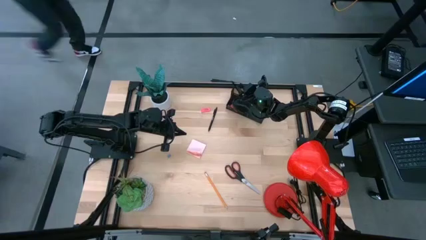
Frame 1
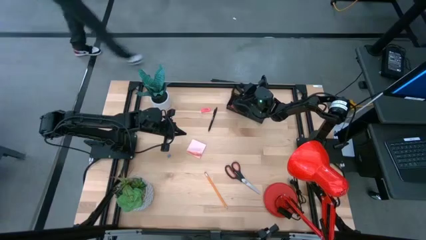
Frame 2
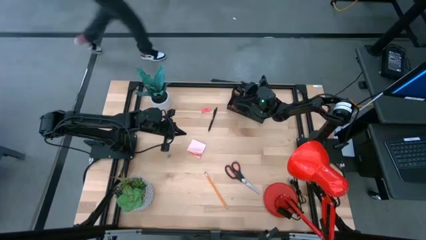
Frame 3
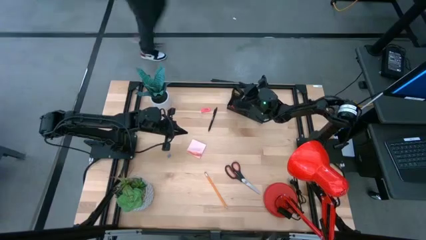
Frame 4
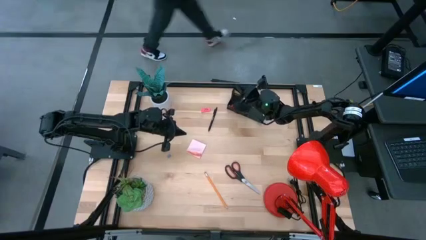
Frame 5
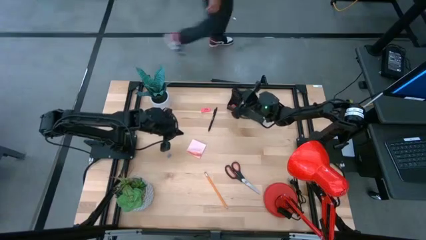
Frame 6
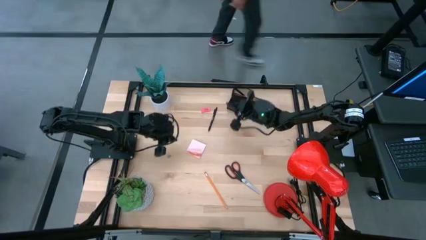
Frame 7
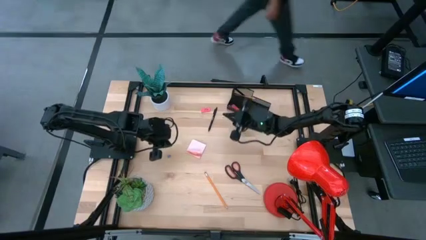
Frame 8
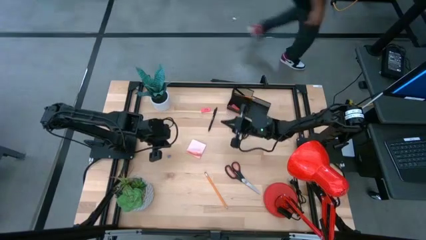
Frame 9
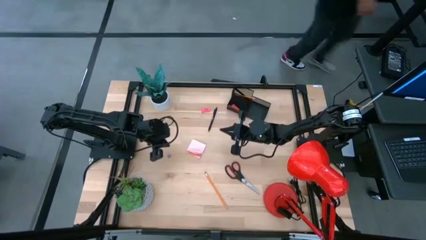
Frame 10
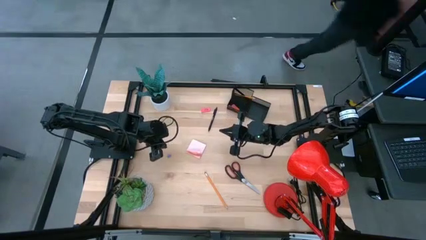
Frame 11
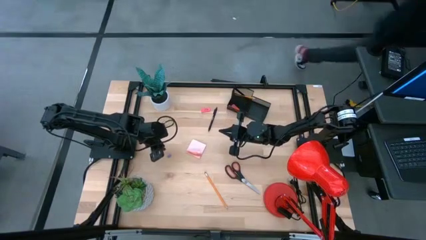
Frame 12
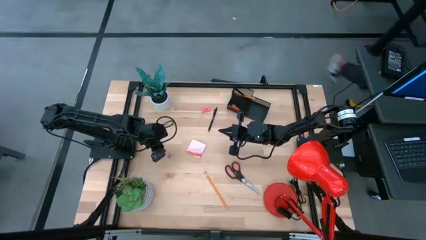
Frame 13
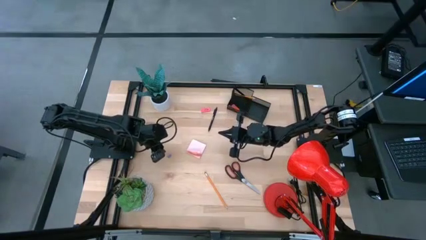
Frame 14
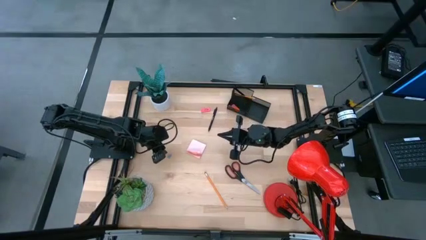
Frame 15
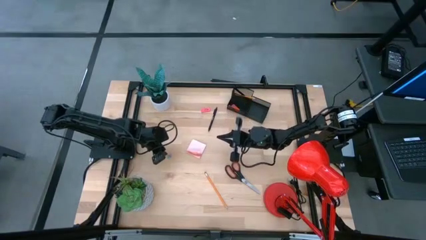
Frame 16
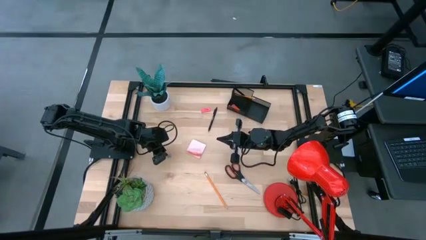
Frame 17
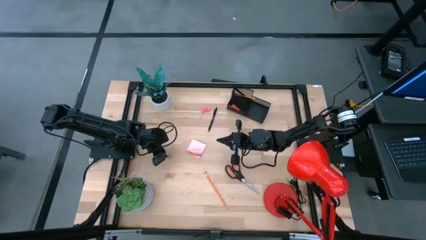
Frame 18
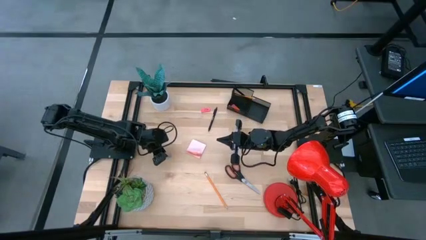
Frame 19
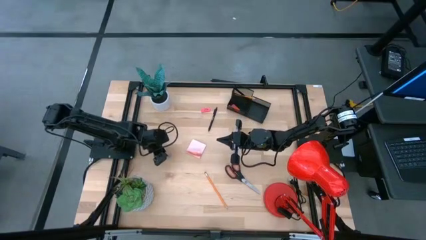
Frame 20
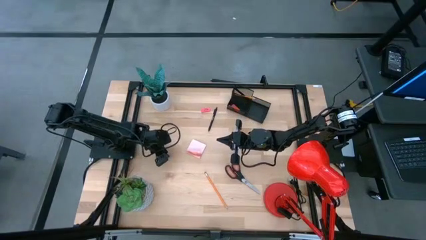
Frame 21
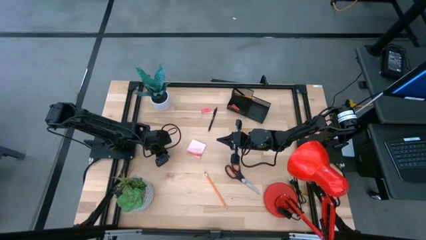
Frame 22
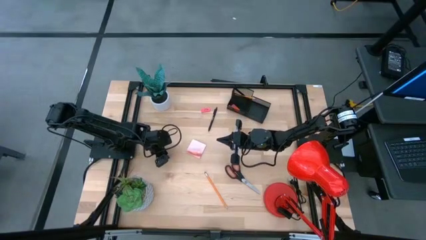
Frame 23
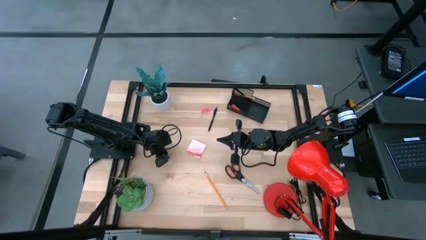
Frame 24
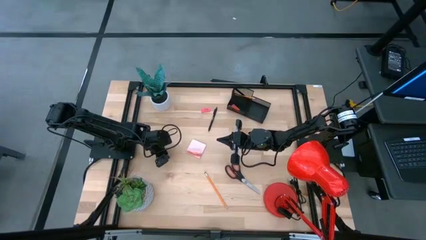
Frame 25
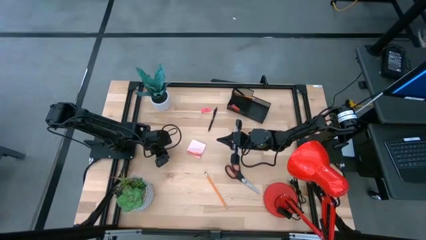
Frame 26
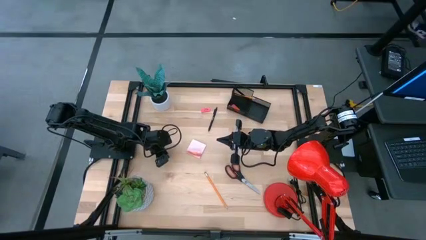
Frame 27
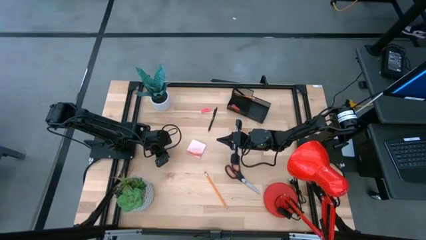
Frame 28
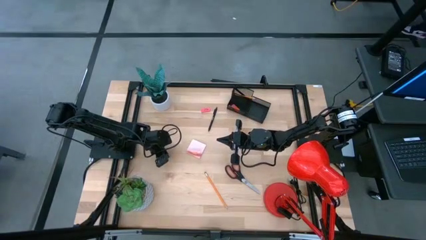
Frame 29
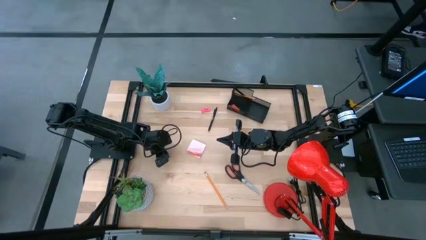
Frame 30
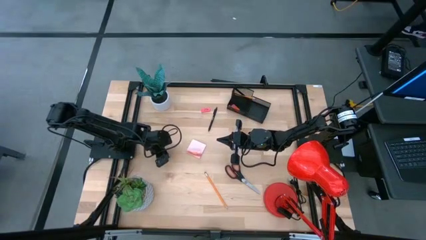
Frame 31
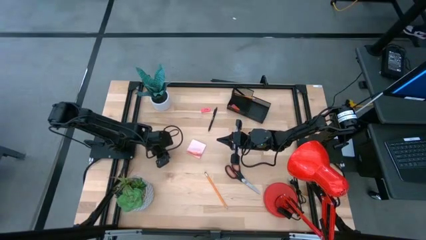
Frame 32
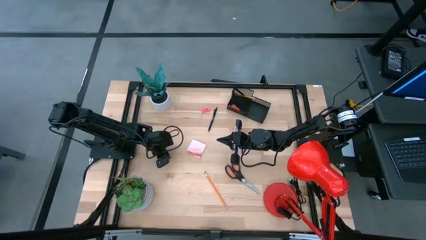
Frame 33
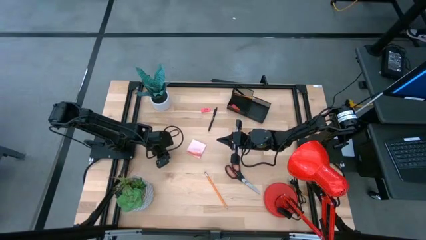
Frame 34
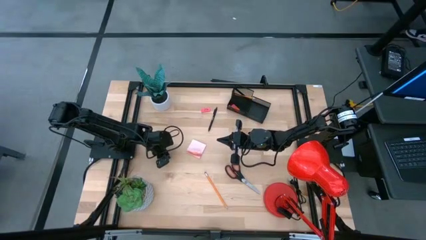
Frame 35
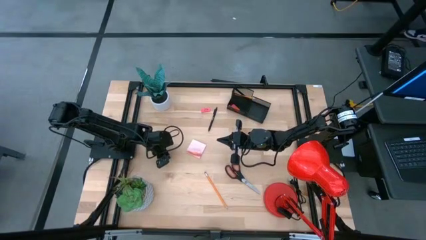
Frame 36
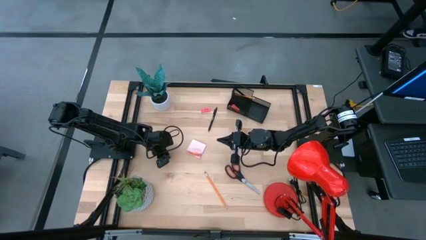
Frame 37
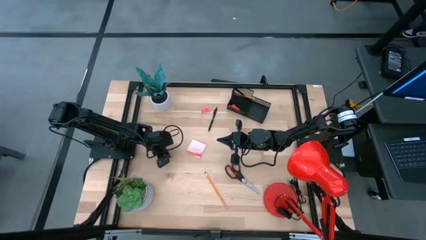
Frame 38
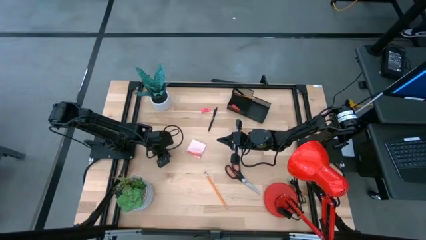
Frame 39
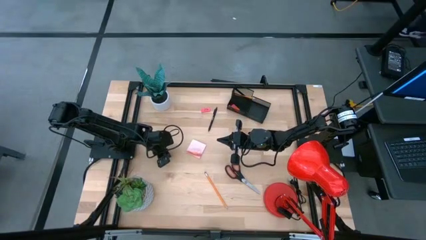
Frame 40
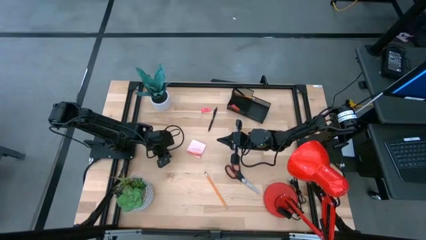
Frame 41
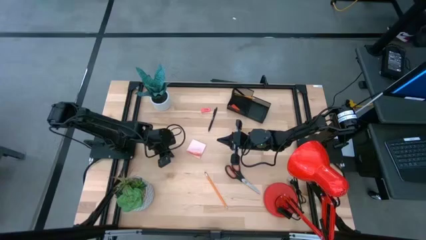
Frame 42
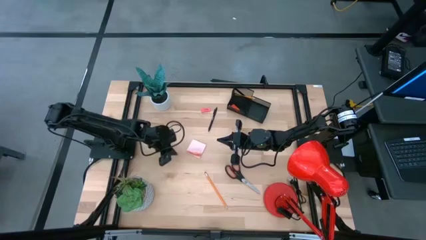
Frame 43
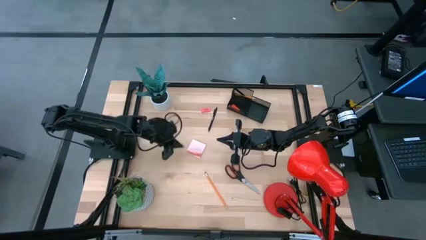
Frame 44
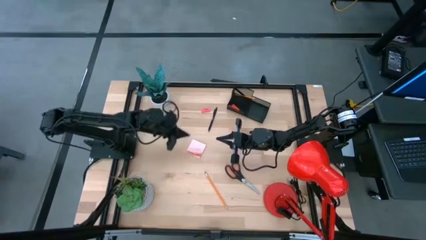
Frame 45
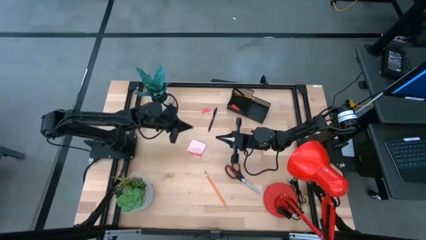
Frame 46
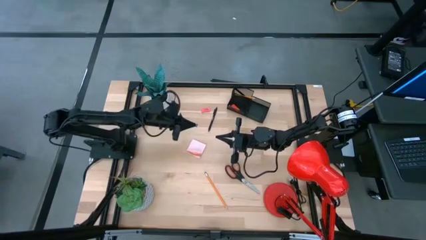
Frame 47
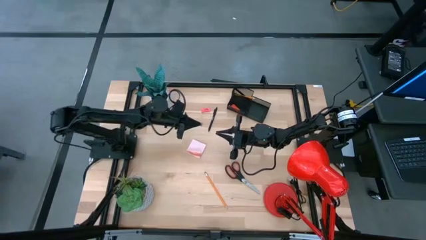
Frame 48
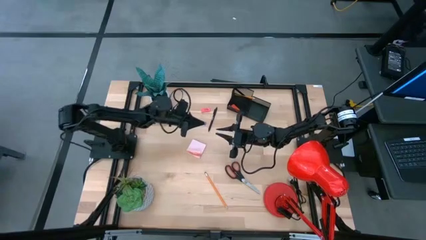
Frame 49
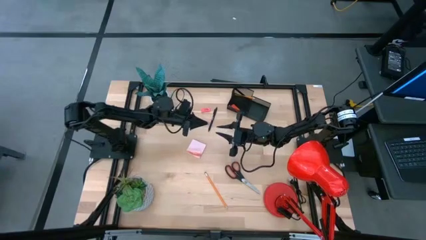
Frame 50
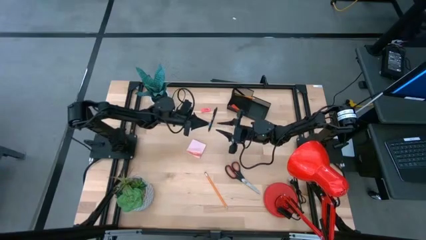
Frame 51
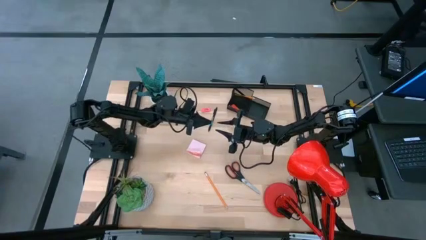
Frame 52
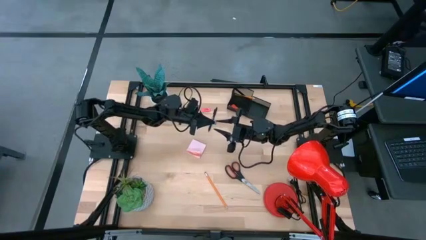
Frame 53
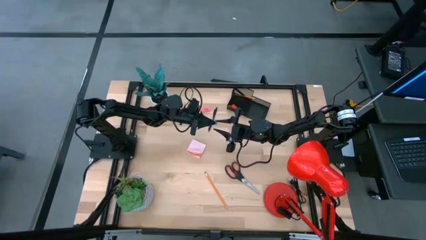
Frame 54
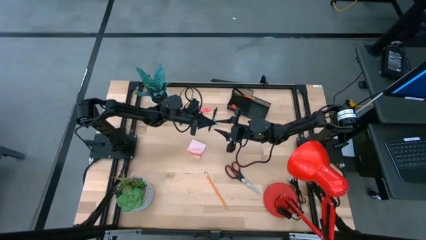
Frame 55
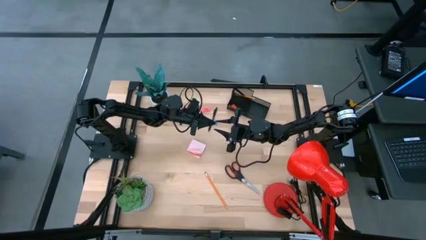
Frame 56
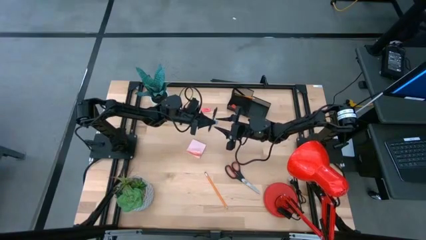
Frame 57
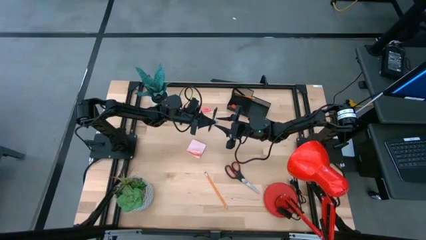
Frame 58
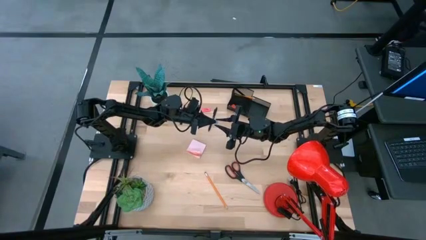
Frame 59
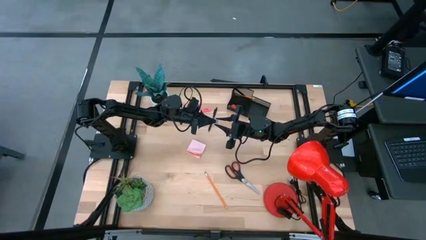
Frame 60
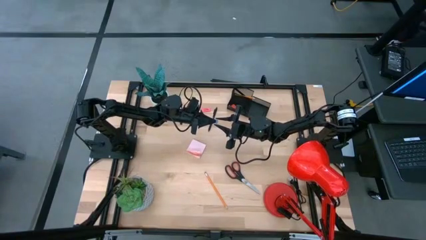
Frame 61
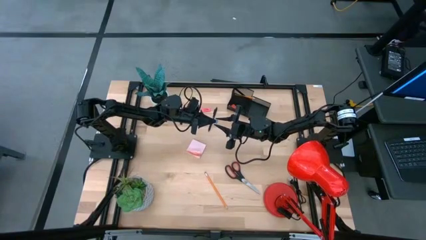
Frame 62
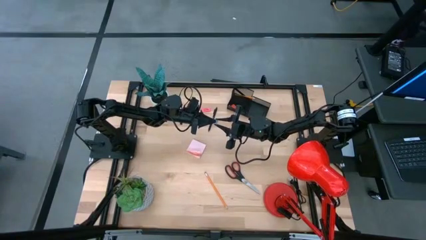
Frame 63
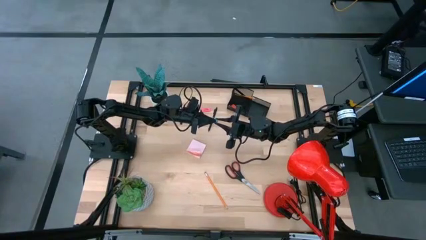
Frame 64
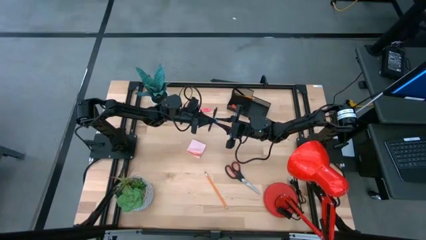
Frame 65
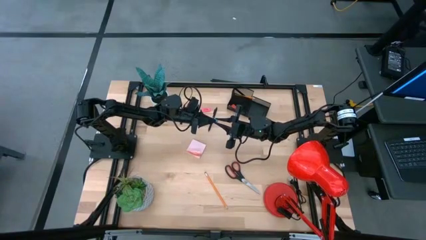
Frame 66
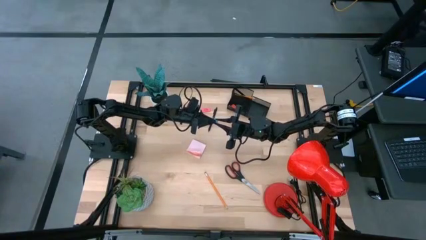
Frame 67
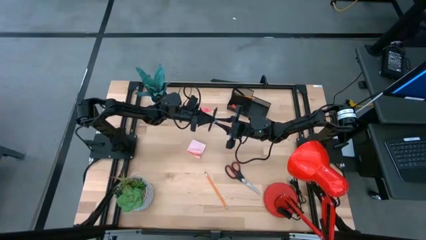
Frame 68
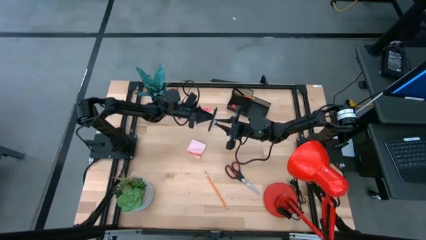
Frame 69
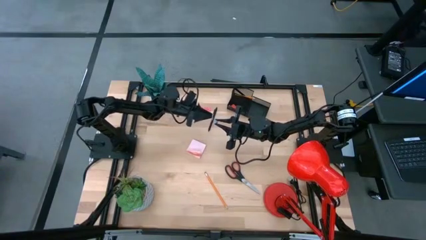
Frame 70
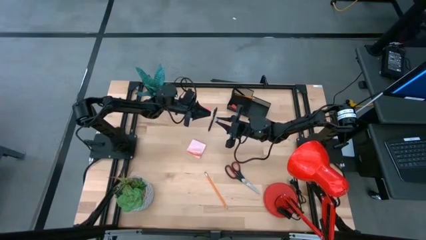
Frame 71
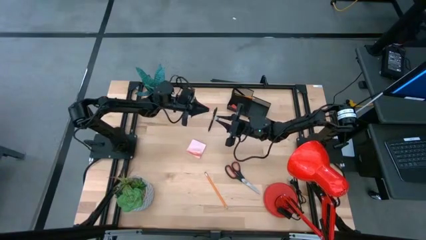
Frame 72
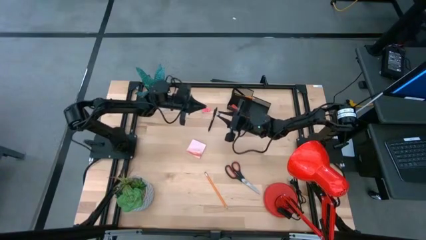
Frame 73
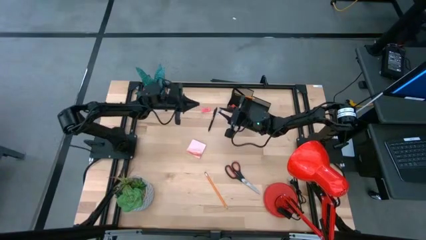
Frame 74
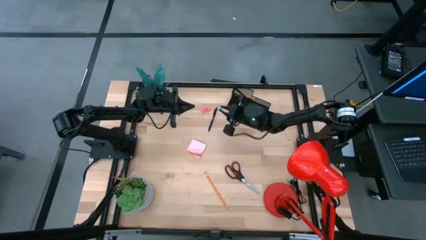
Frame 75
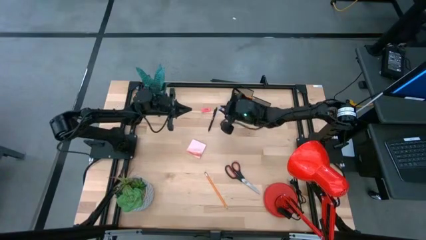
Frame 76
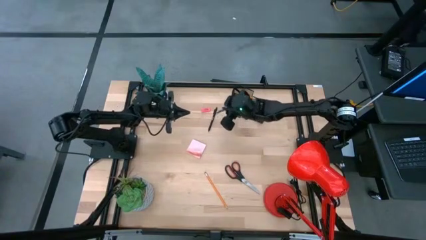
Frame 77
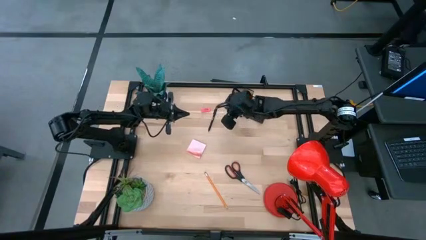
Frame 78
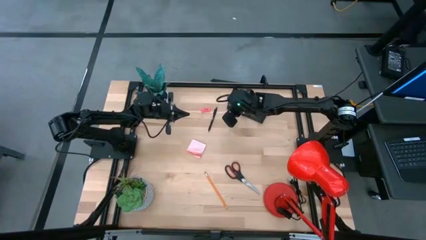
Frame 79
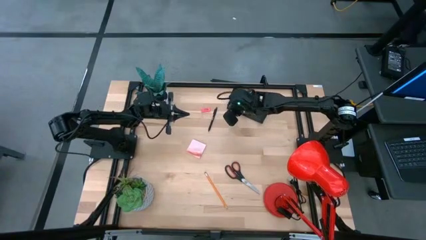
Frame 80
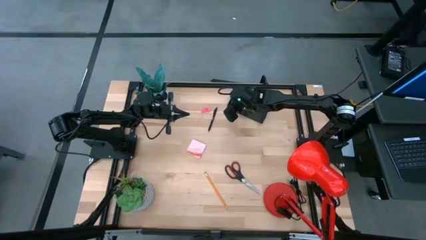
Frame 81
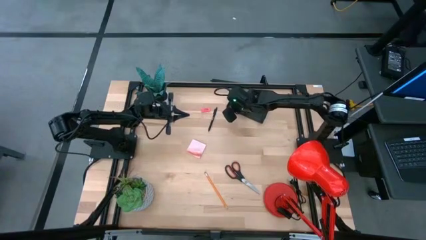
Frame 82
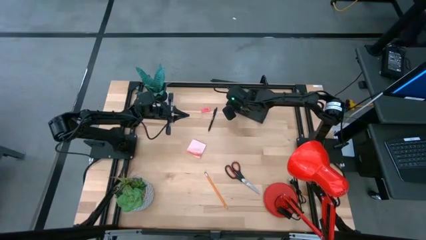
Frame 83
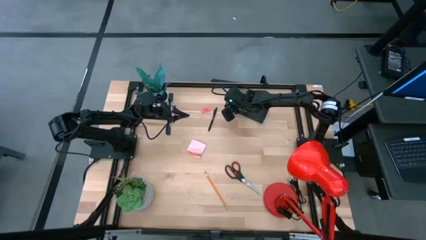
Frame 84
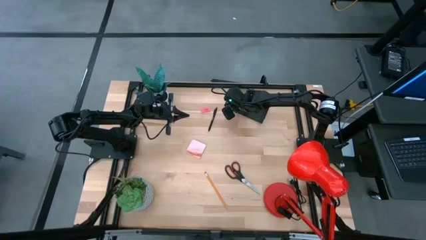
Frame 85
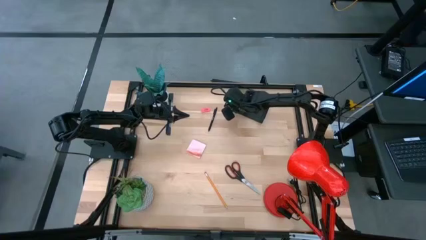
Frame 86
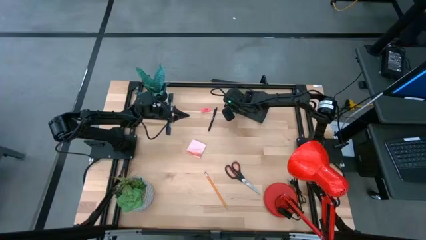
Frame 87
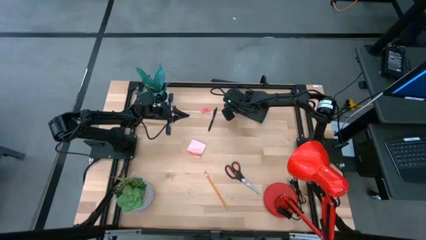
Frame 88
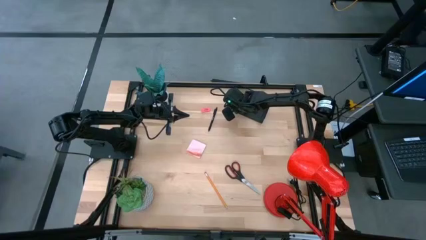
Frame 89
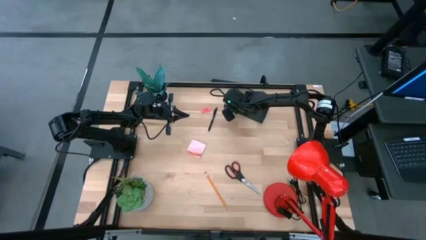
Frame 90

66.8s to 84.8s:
Task: Pick and place office supplies into organizer
Put the blue binder clip into the black desk organizer
